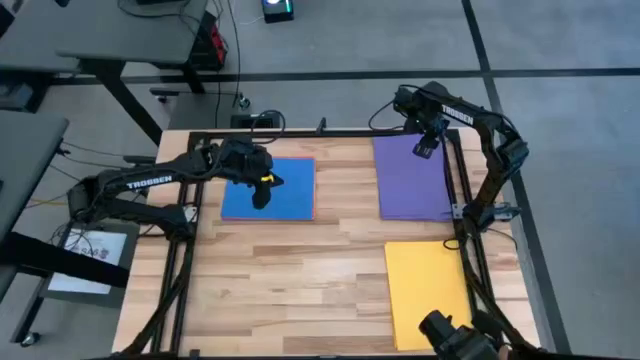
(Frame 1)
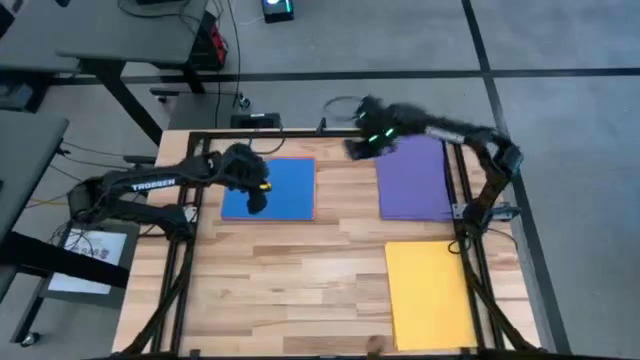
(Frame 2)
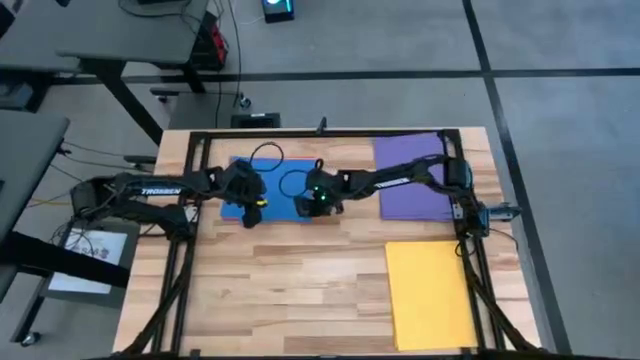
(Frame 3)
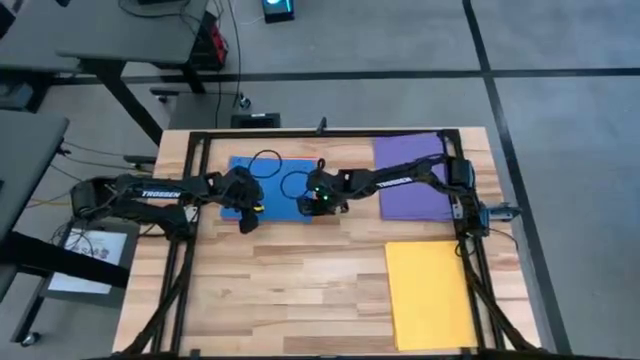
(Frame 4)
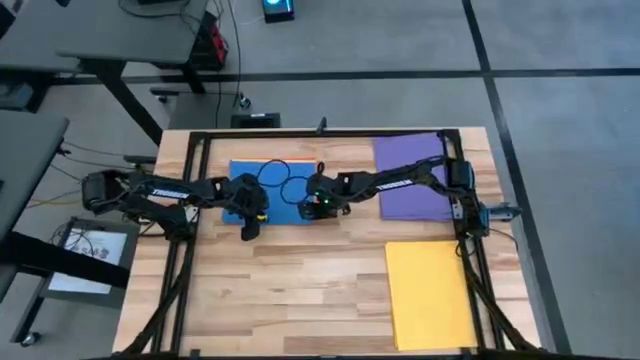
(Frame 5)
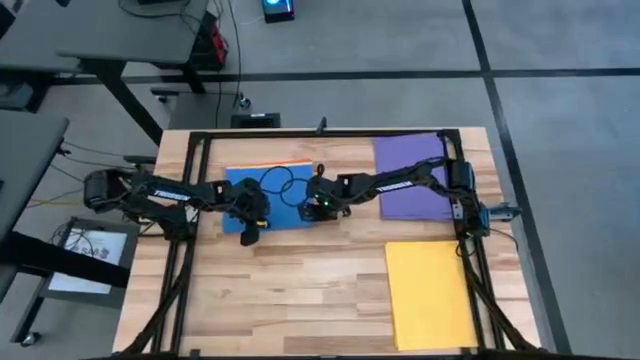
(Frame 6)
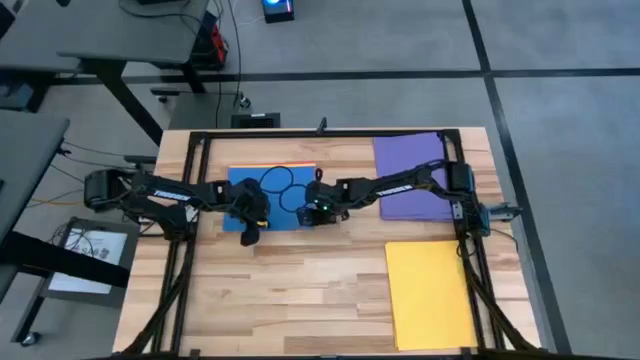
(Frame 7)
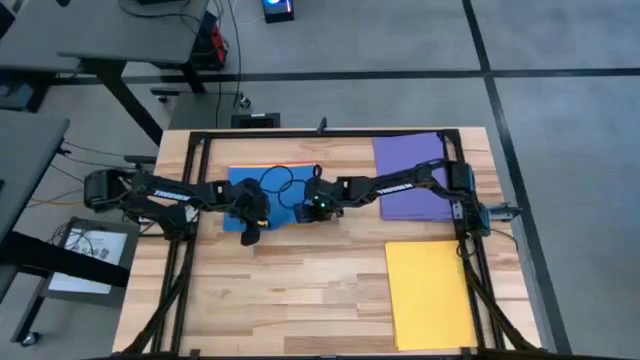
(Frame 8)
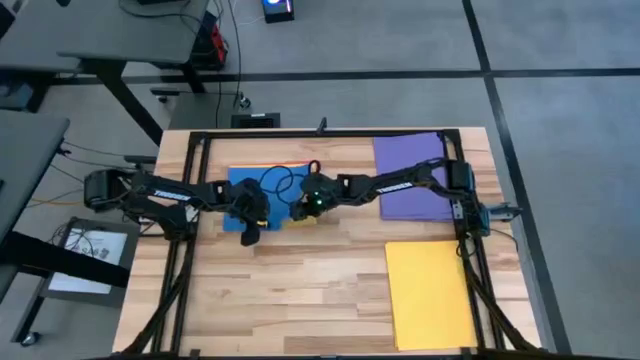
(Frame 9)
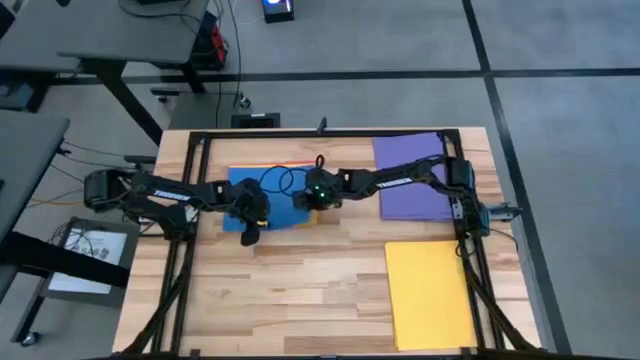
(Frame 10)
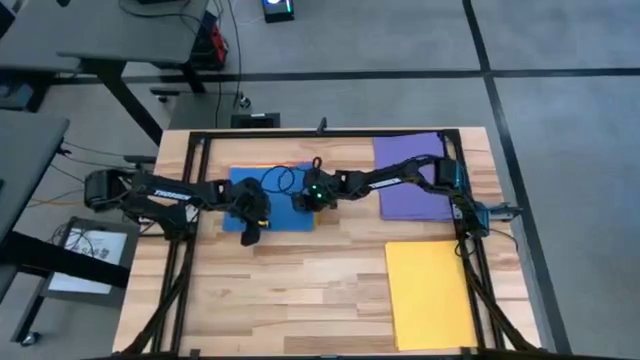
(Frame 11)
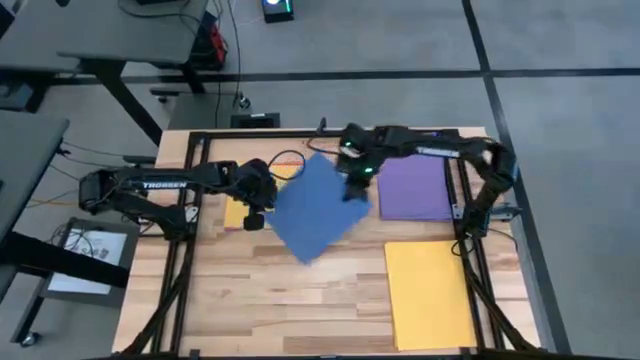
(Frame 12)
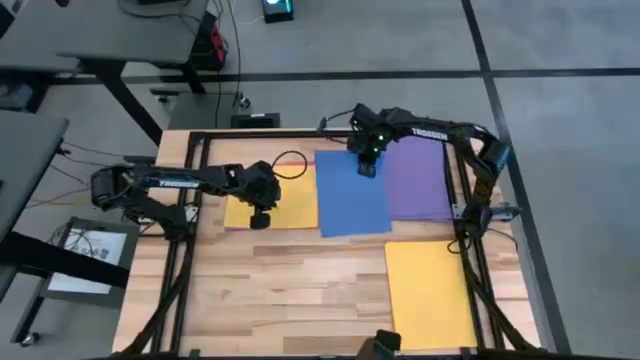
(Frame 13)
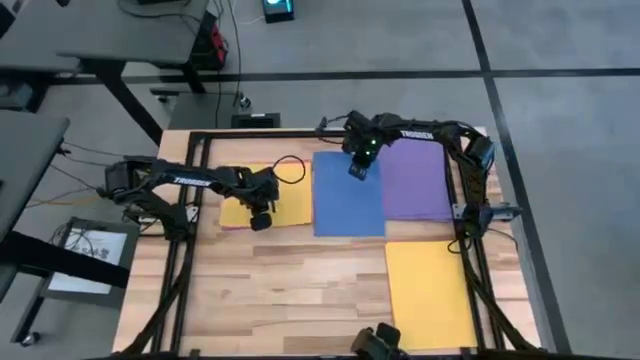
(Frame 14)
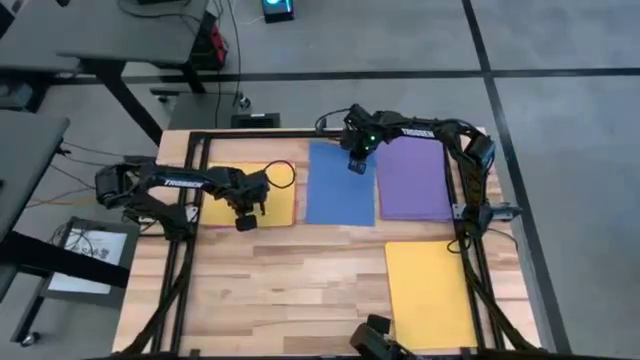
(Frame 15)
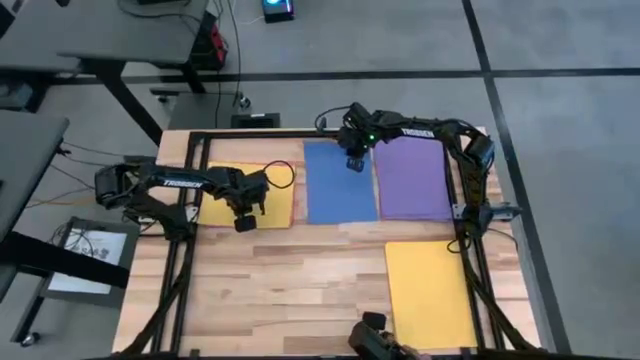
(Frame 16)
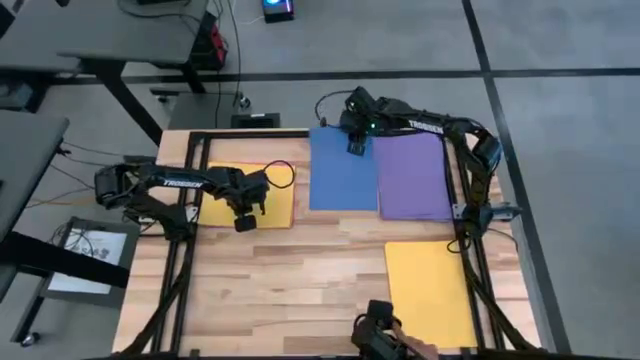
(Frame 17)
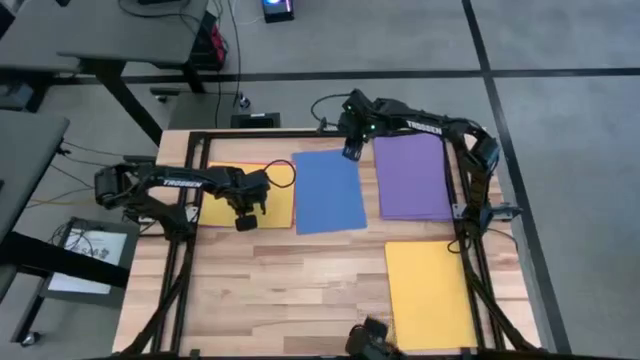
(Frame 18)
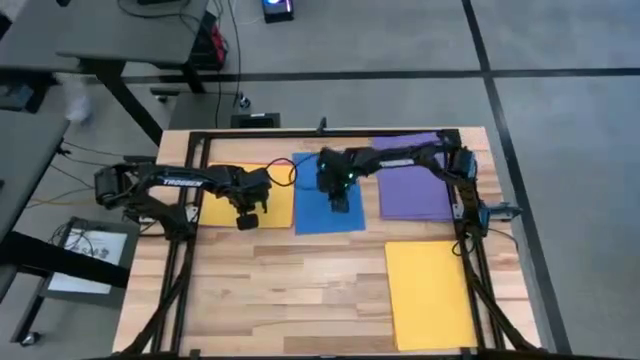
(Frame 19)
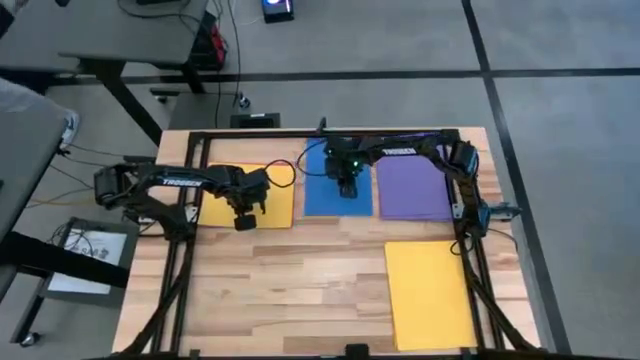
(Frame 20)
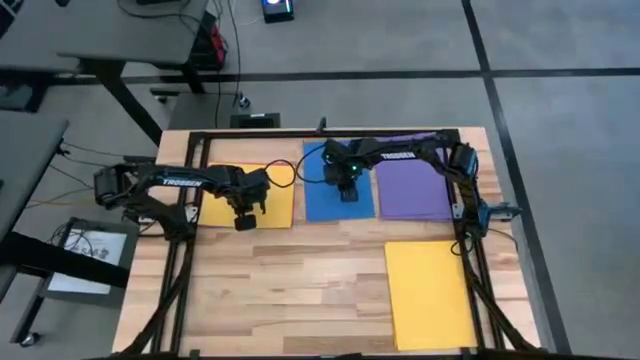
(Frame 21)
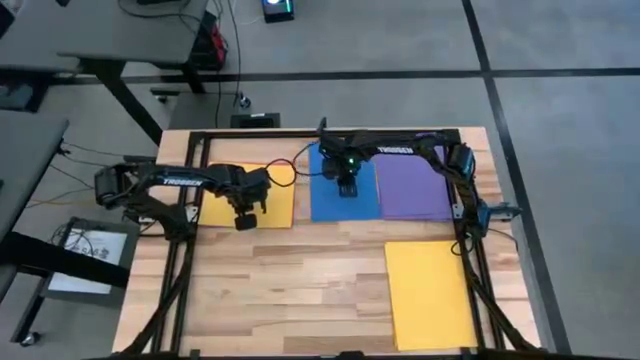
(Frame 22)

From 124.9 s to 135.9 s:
Task: Organize paper
Put the blue paper into the top center of the table

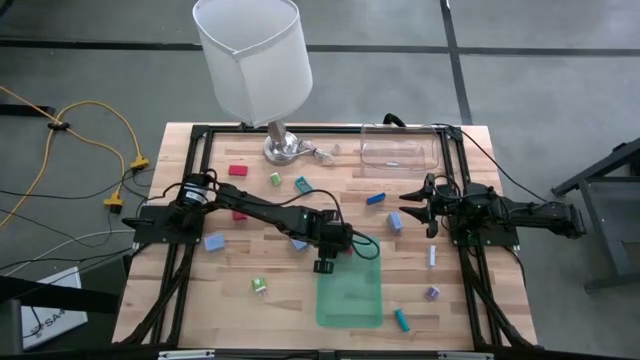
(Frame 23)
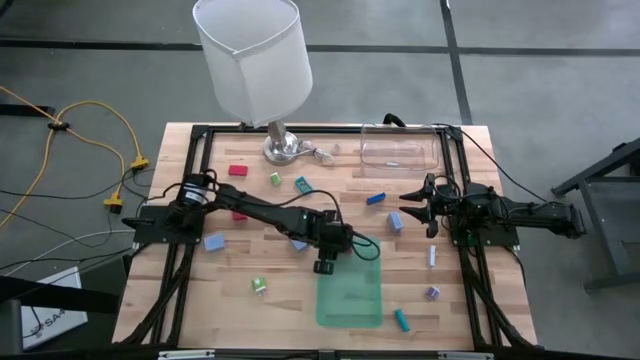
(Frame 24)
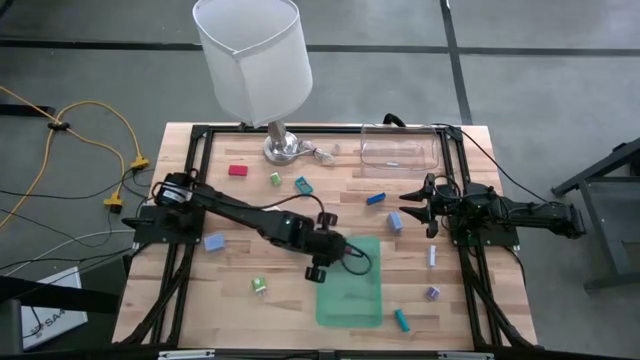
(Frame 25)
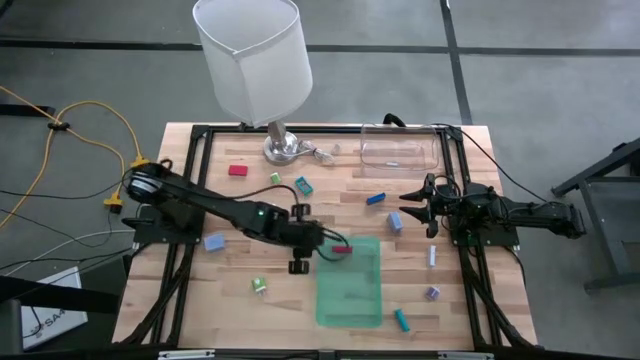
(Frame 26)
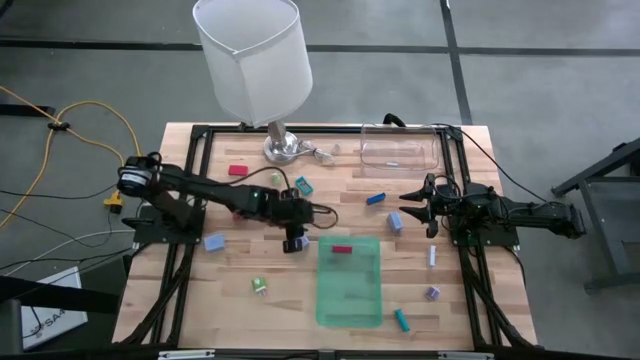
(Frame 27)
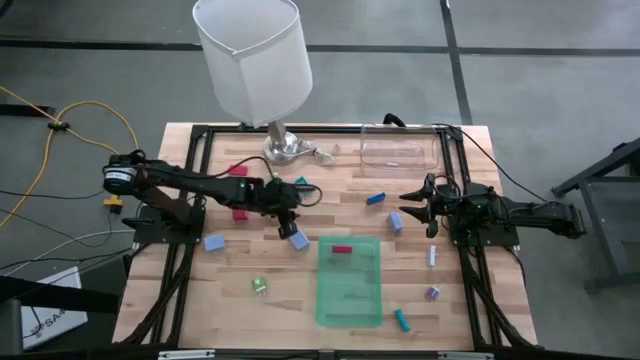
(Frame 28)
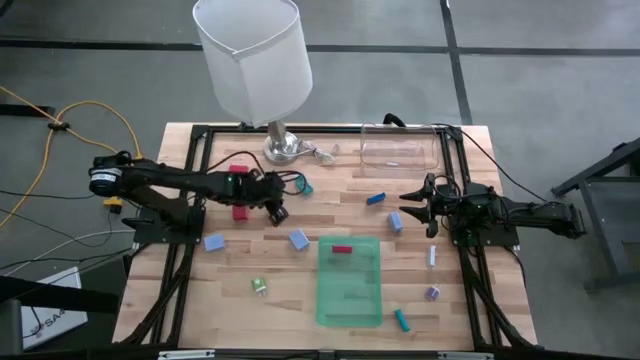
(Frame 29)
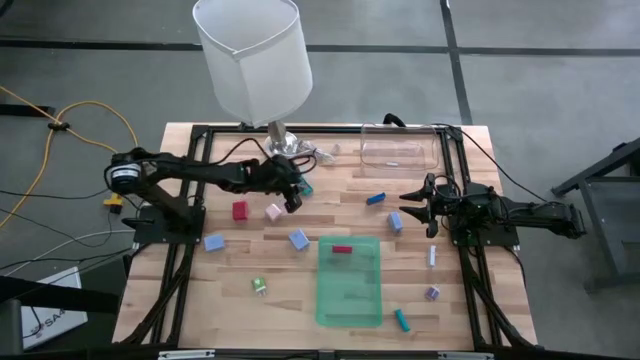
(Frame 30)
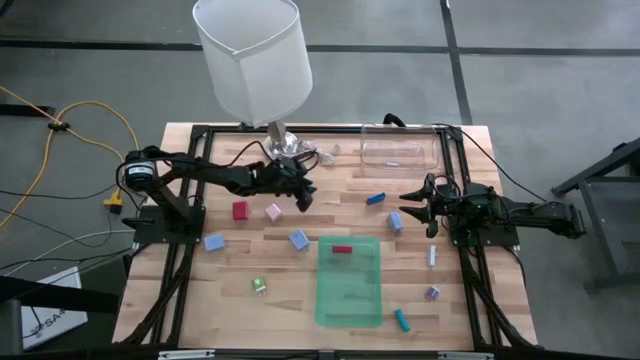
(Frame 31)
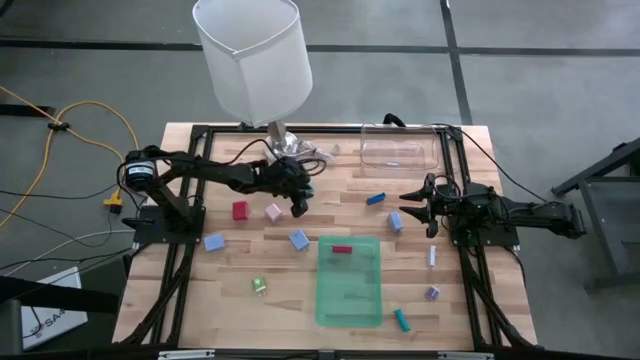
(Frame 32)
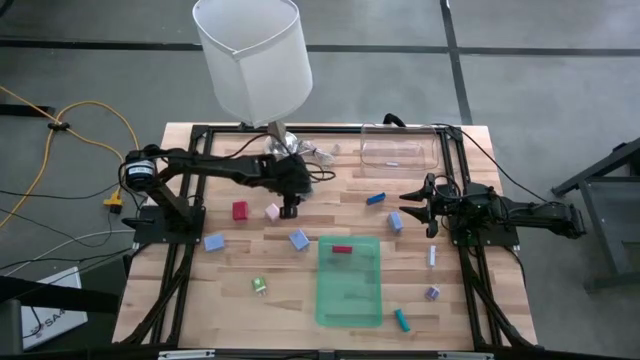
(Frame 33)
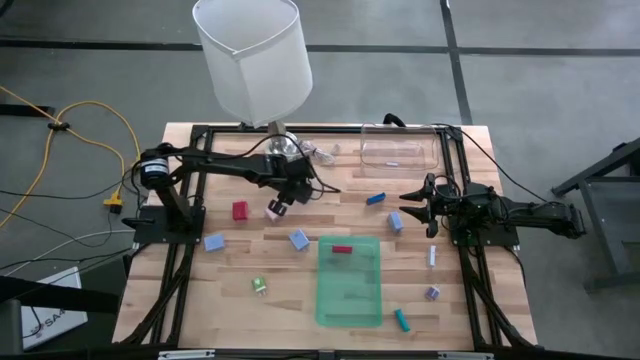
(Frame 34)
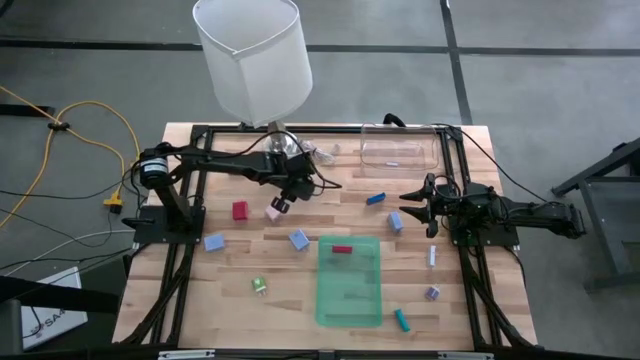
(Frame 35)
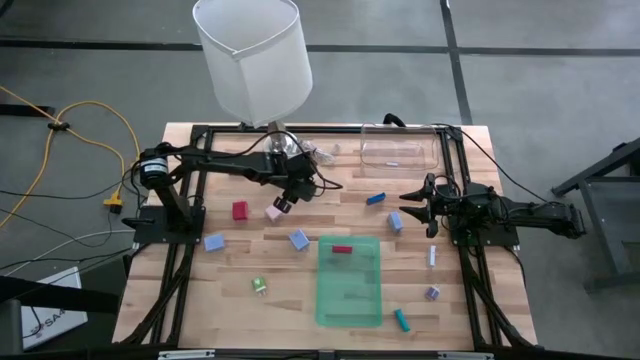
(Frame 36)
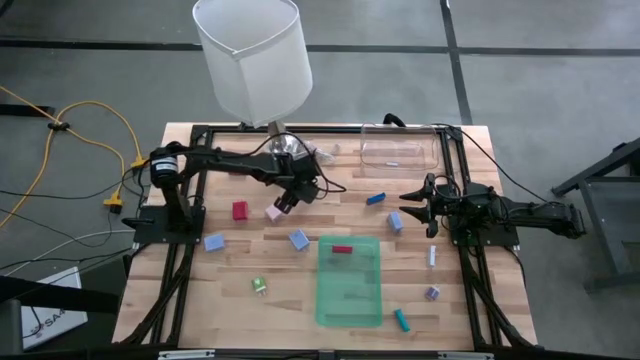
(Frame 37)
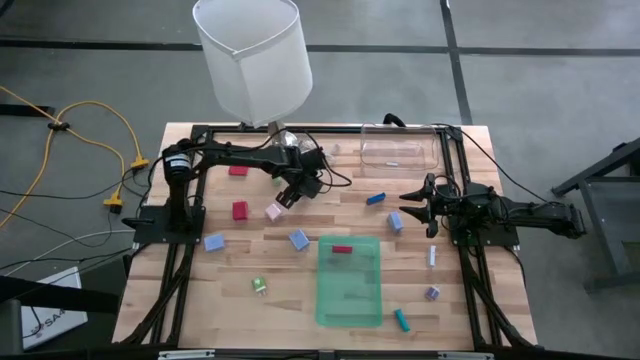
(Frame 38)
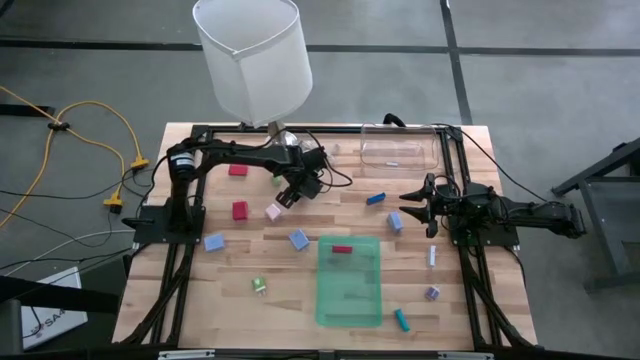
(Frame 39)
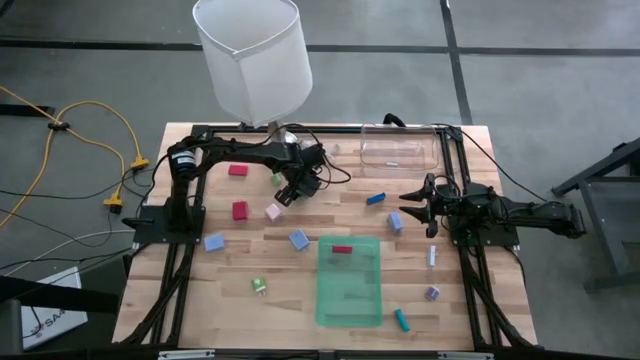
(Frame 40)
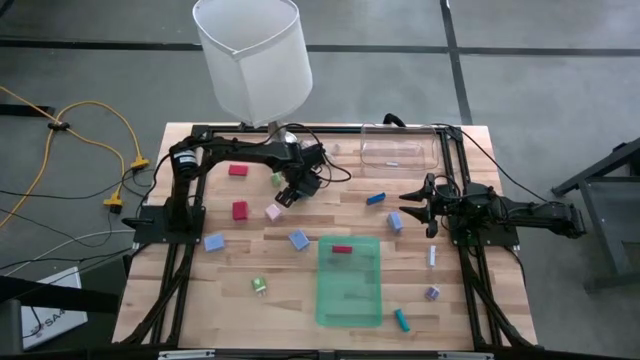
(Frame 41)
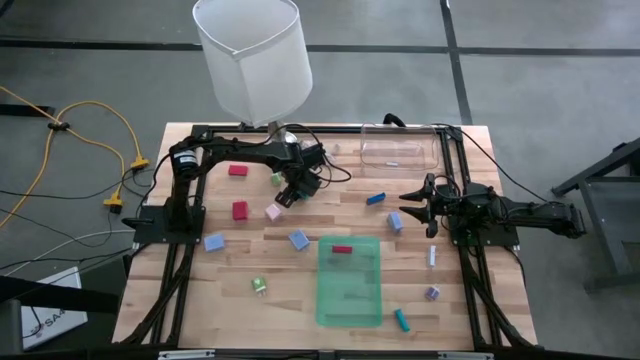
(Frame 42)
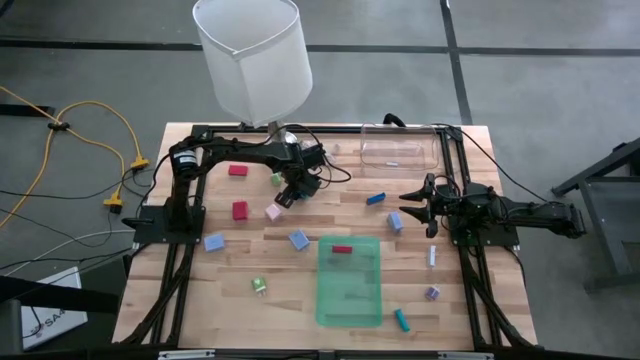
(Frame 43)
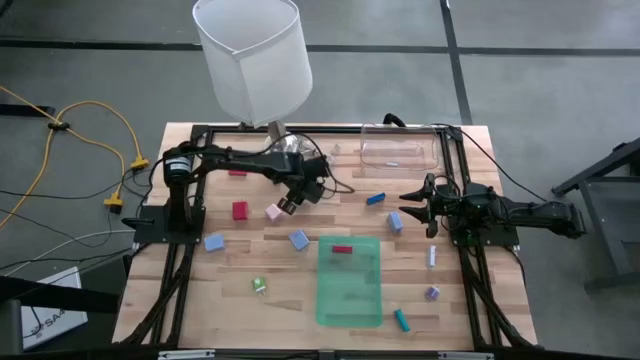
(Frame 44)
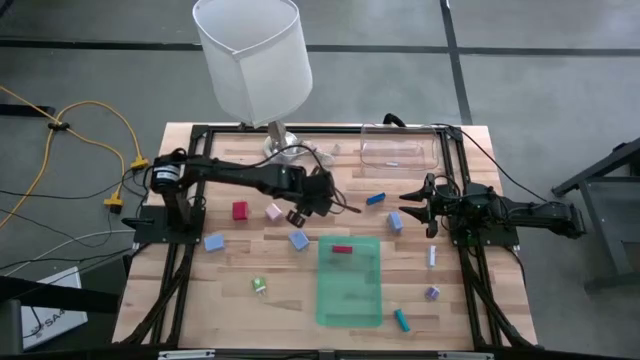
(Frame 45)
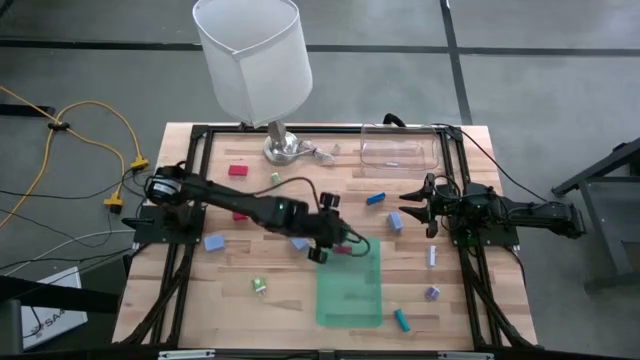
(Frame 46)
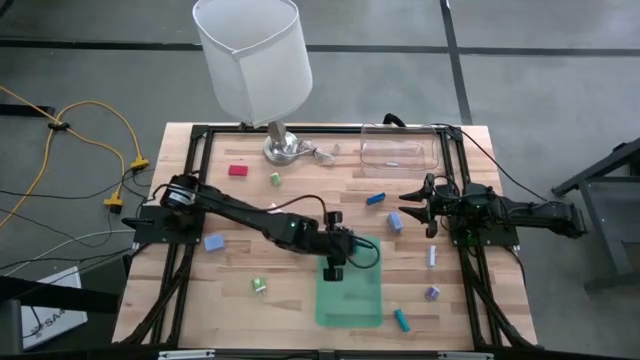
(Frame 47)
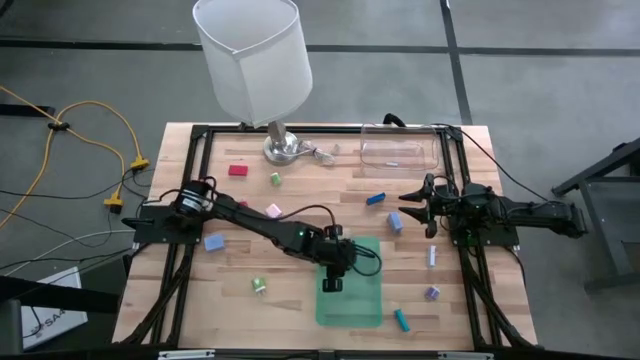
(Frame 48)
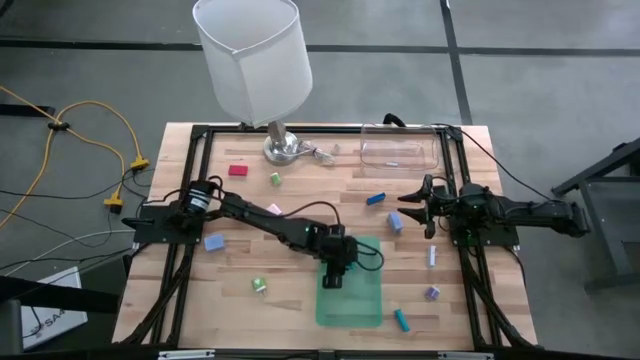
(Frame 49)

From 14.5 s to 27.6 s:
Task: Pick & Place Office items
Put the top light blue digital clock into the green bin
